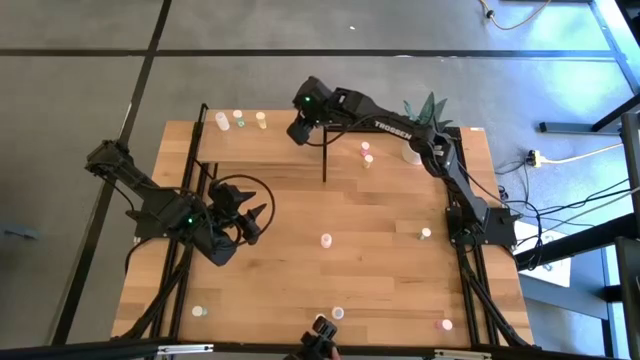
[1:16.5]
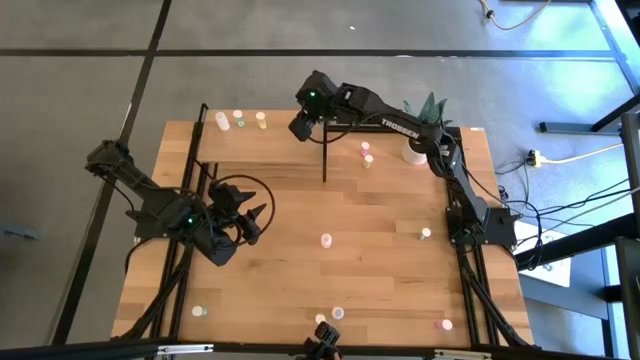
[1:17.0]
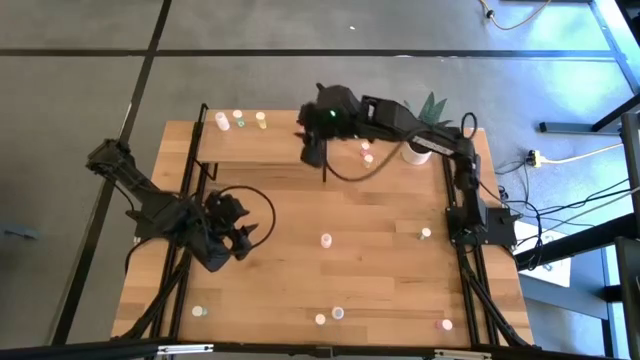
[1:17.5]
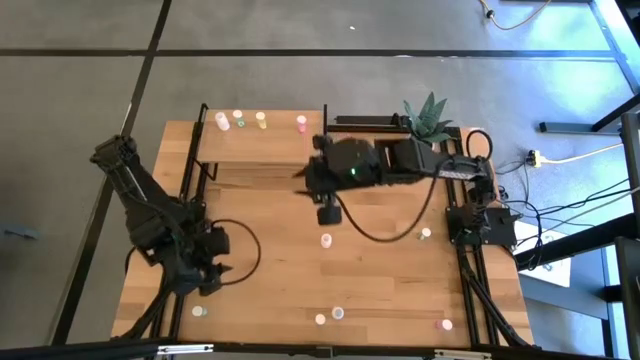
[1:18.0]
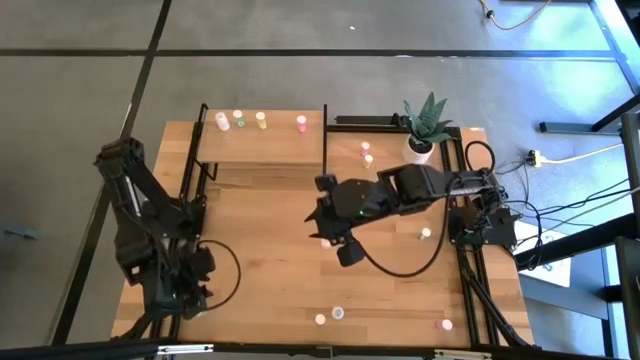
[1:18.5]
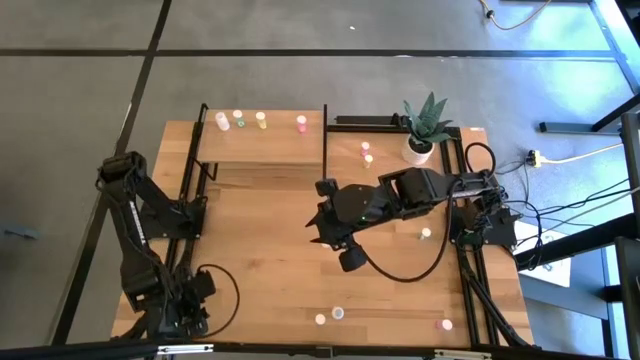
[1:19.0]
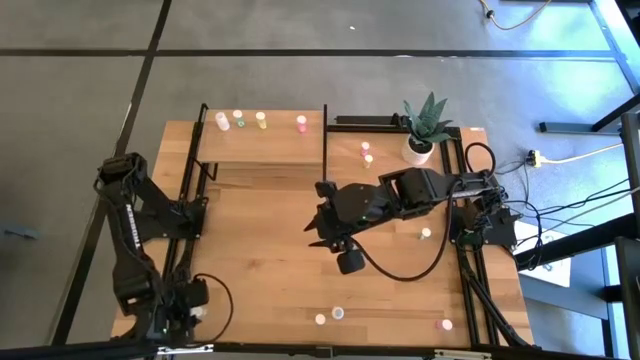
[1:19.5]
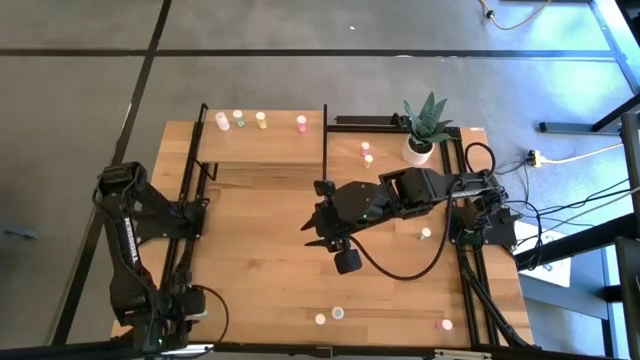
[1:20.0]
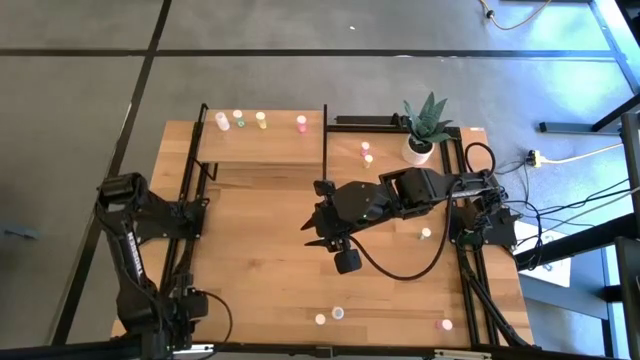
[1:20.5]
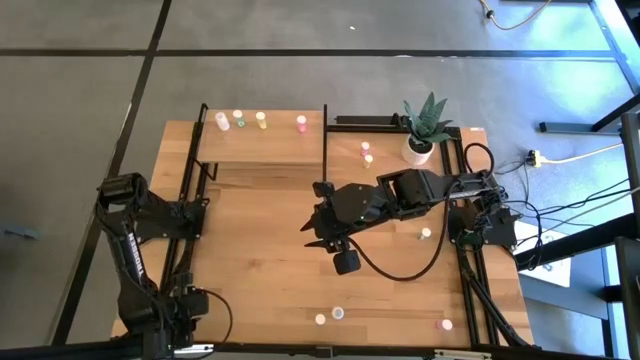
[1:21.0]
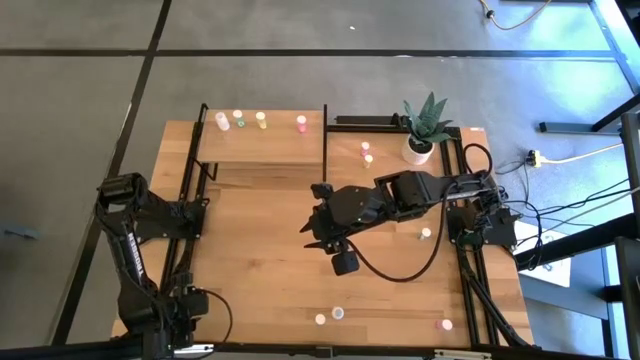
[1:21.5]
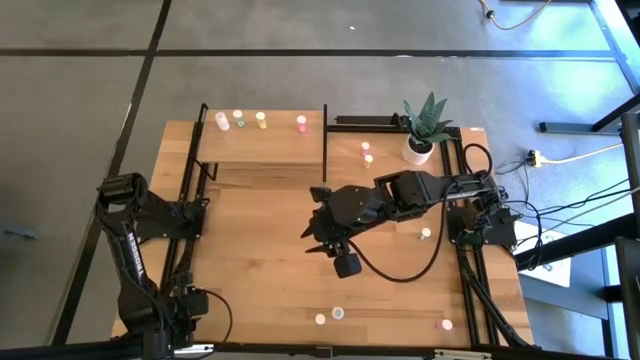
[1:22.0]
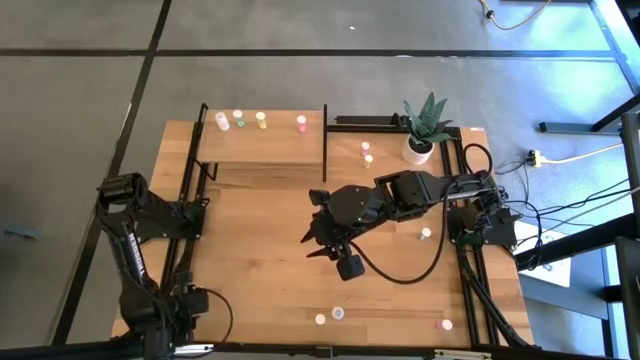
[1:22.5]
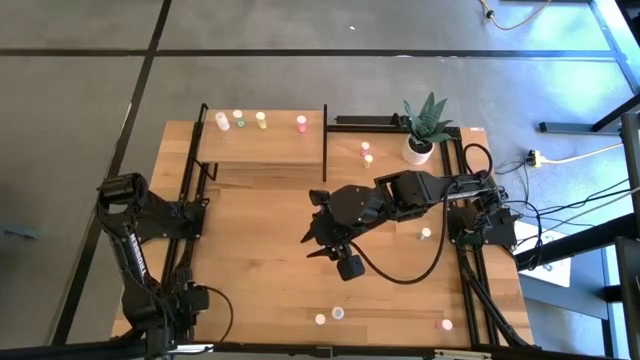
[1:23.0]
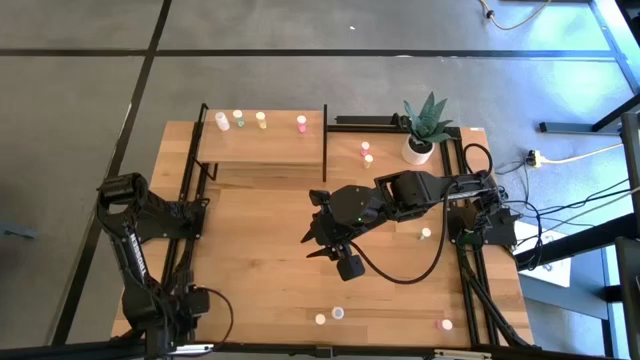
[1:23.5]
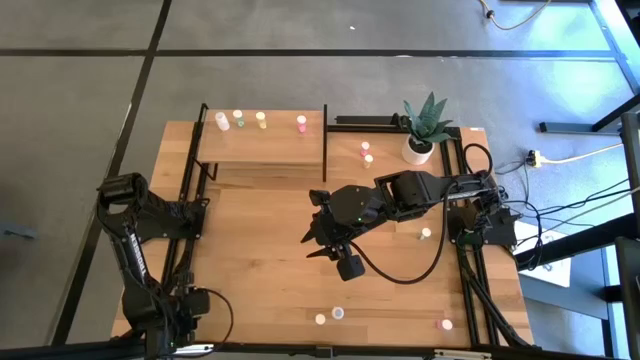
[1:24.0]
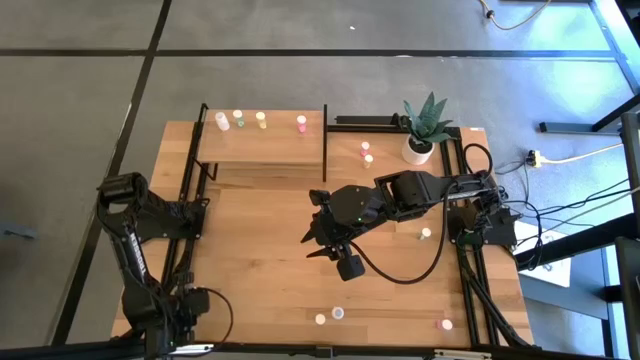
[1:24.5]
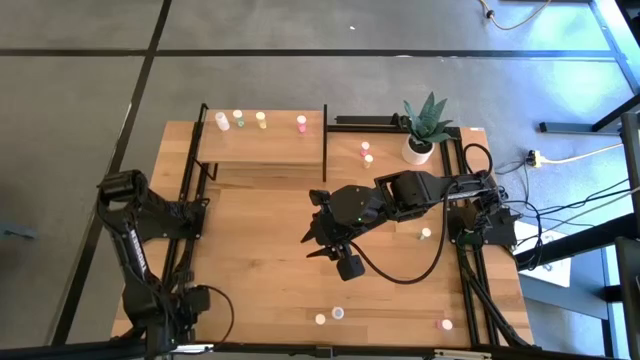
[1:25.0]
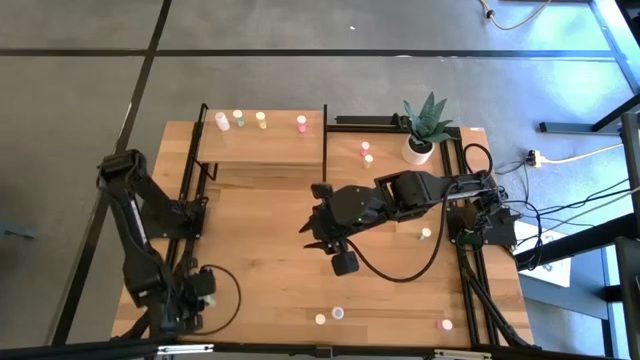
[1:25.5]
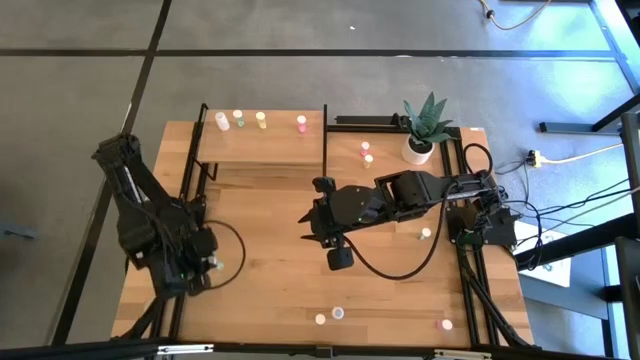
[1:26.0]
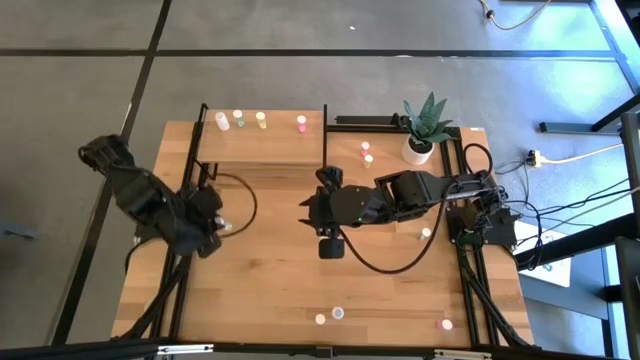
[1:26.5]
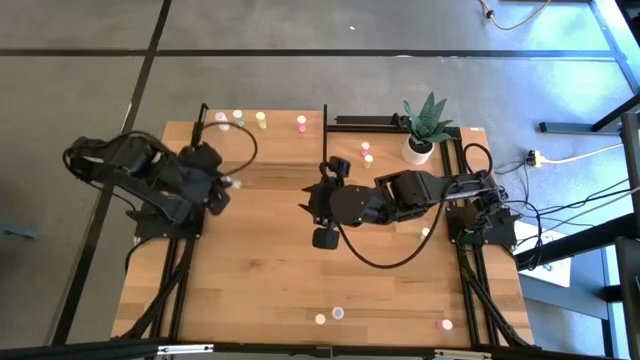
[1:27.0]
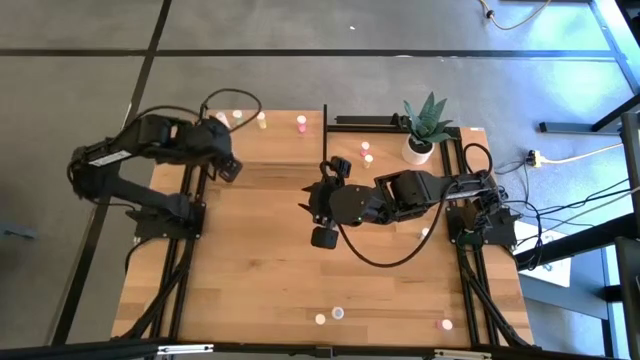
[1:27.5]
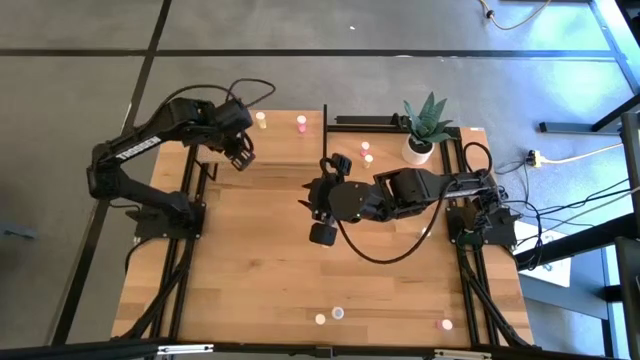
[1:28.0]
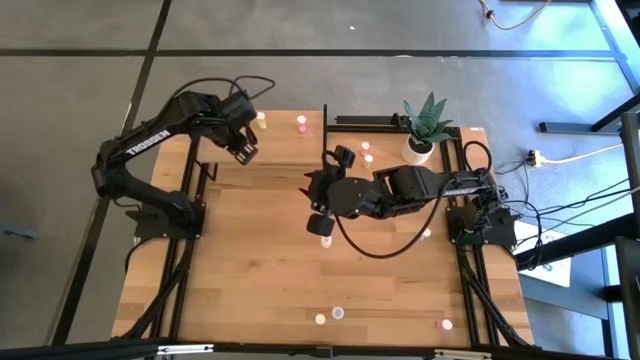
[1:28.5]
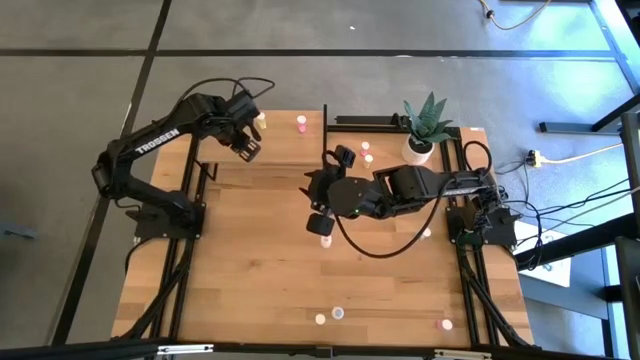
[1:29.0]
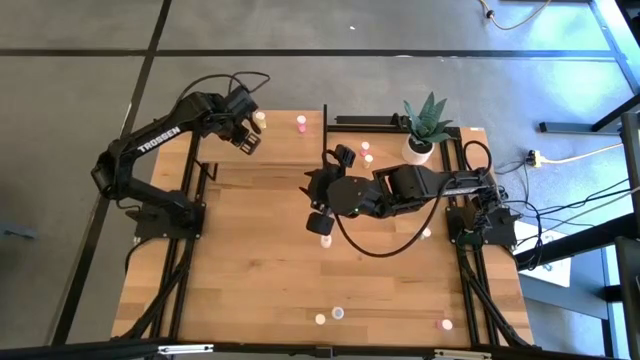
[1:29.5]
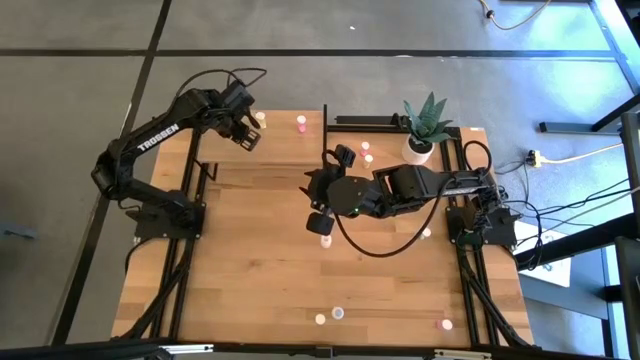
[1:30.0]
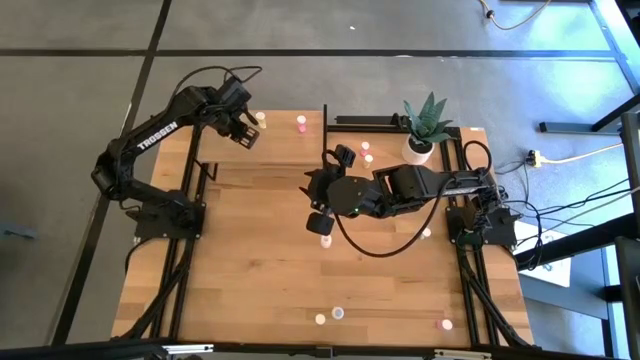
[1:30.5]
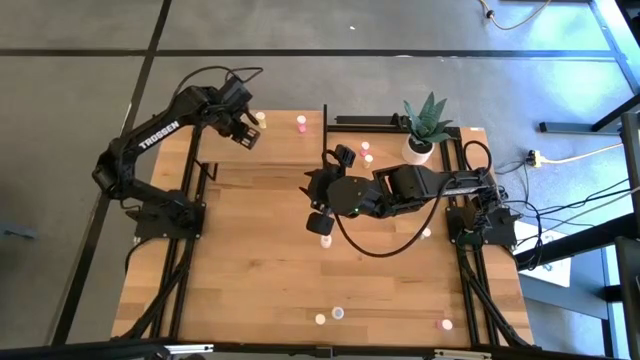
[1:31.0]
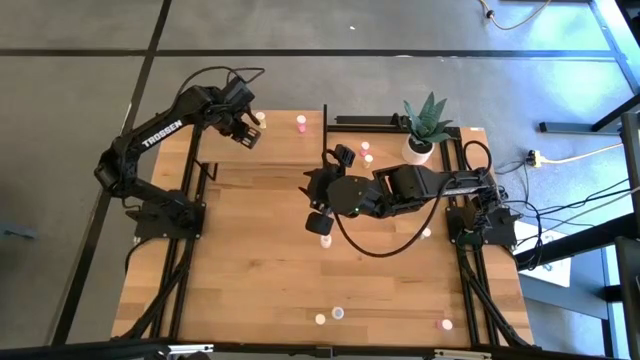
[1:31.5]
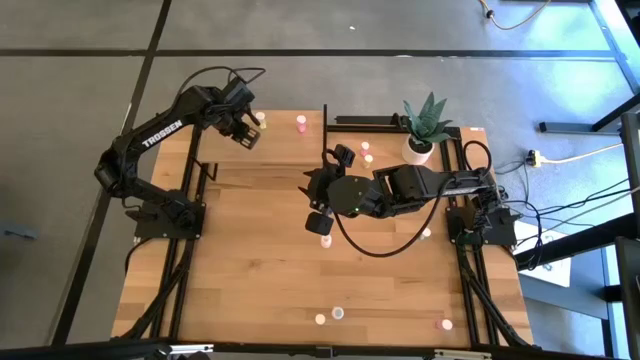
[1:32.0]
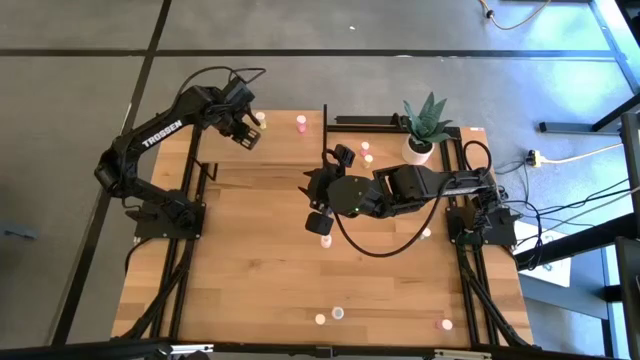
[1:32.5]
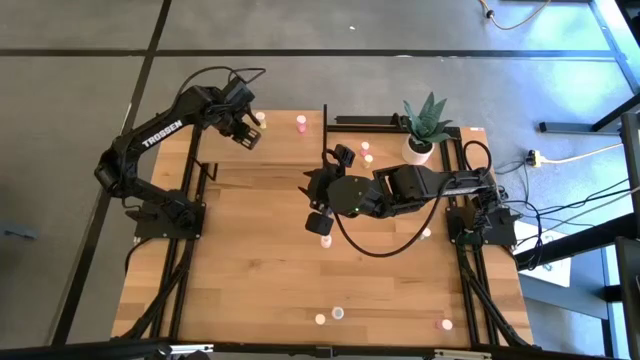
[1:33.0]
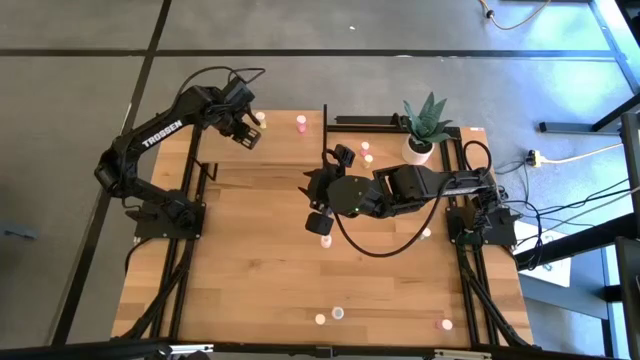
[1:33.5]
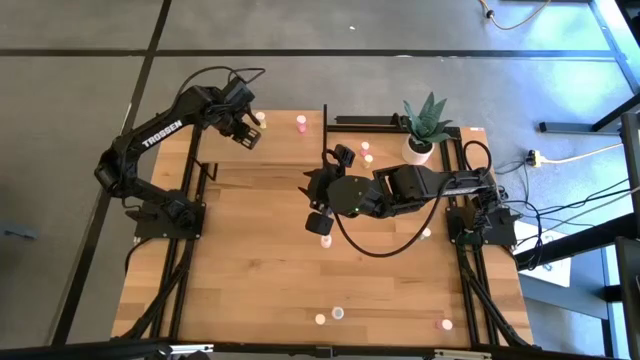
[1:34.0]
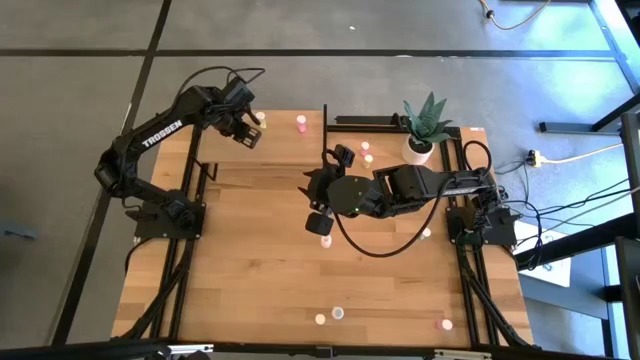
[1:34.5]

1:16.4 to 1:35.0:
Task: Pick and place medicine bottles onto shelf by color
Put the bottom blue pill bottle aligned with the other blue pill bottle on the shelf
